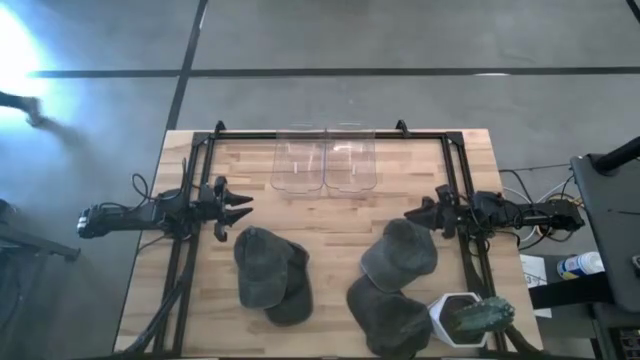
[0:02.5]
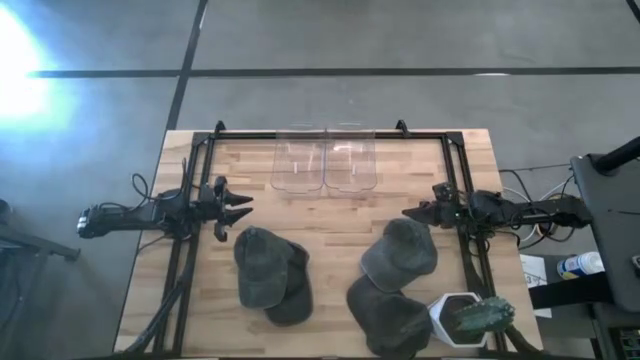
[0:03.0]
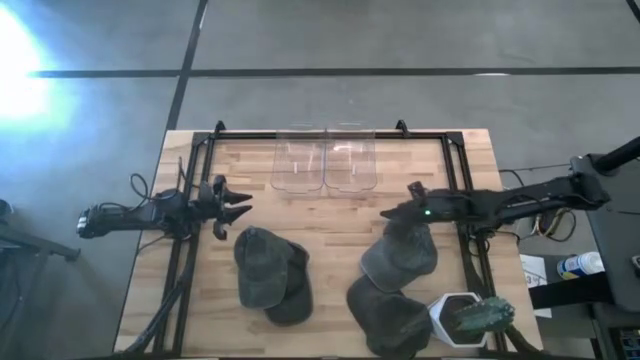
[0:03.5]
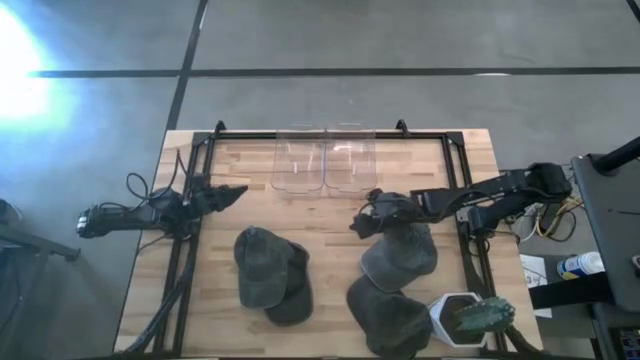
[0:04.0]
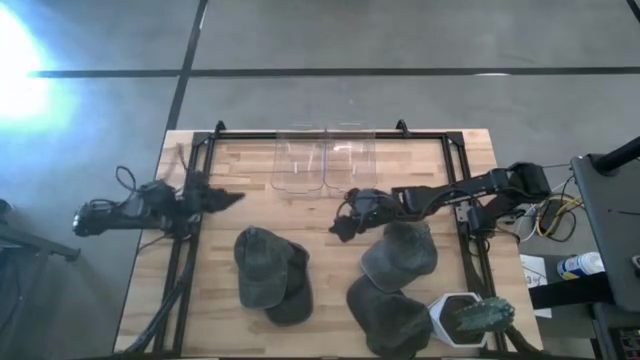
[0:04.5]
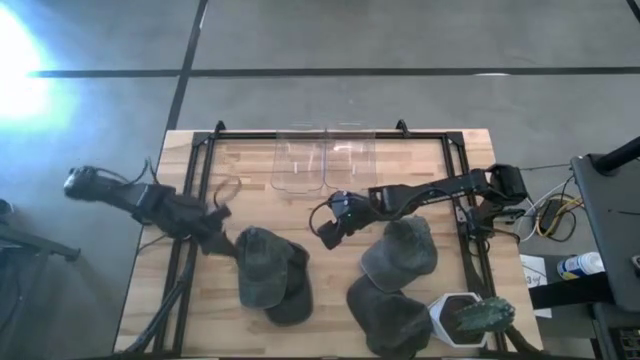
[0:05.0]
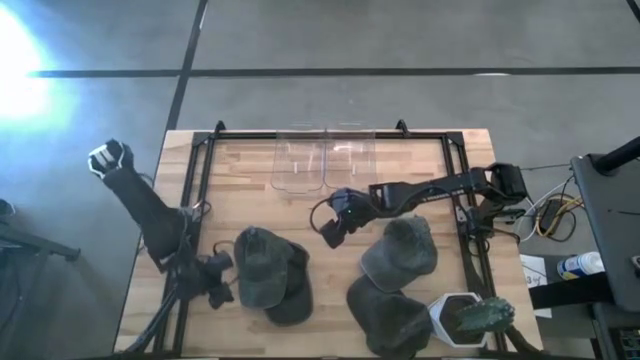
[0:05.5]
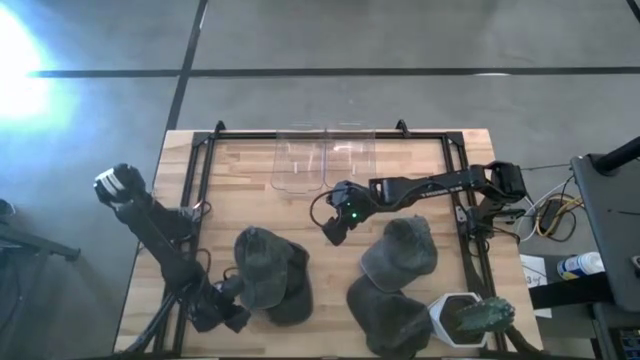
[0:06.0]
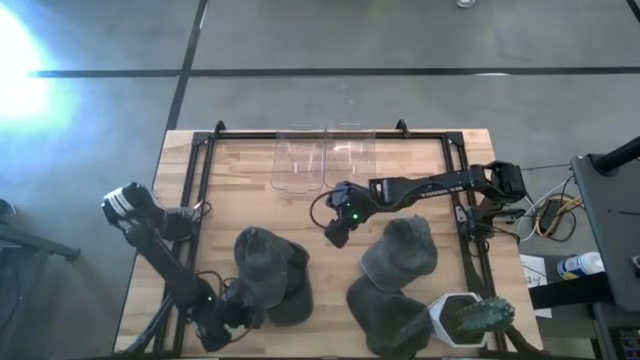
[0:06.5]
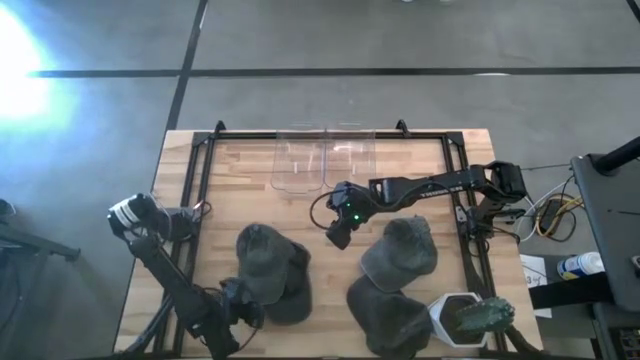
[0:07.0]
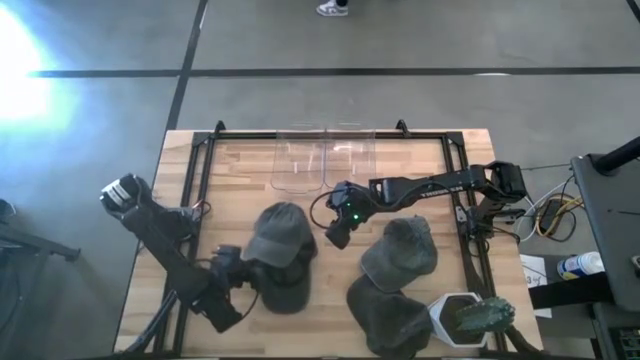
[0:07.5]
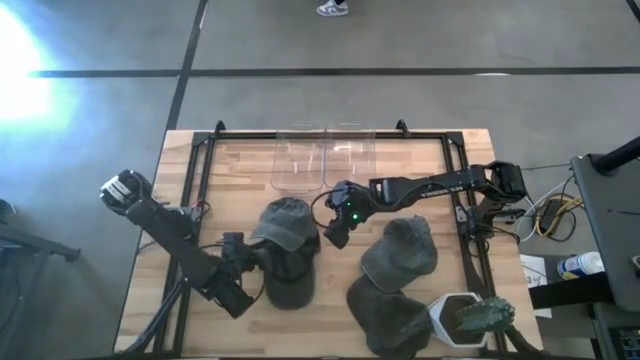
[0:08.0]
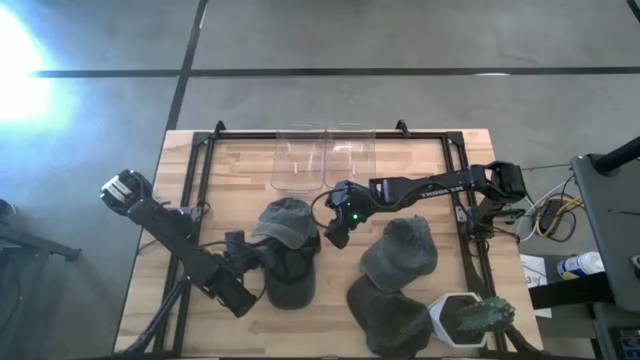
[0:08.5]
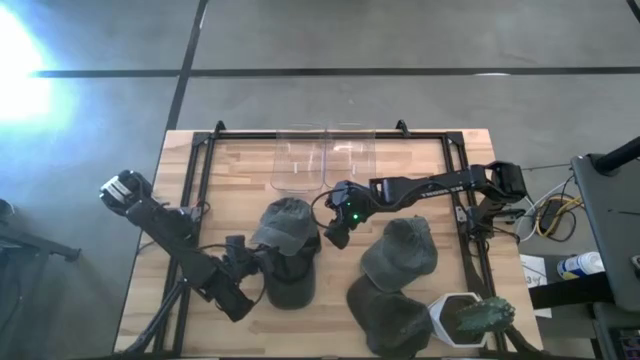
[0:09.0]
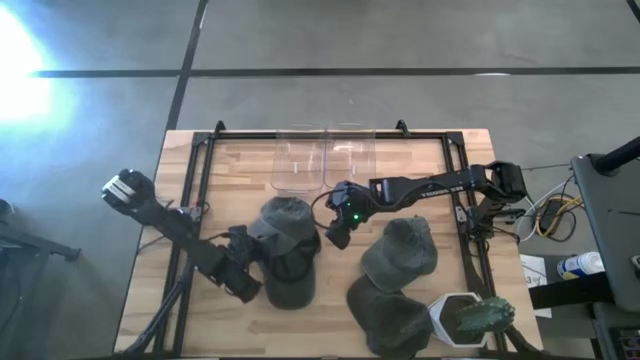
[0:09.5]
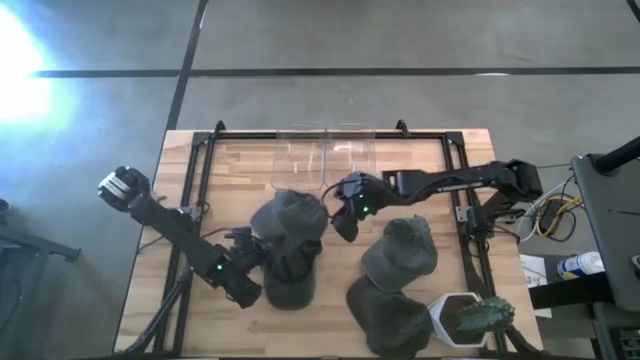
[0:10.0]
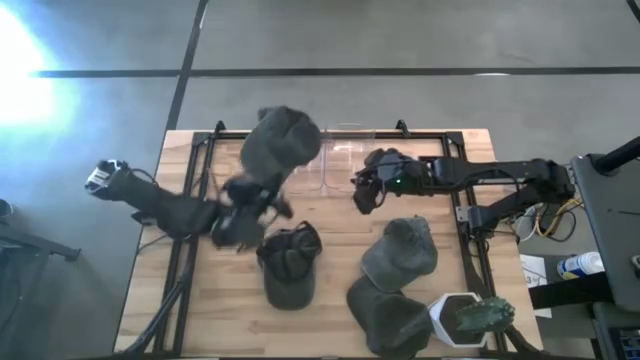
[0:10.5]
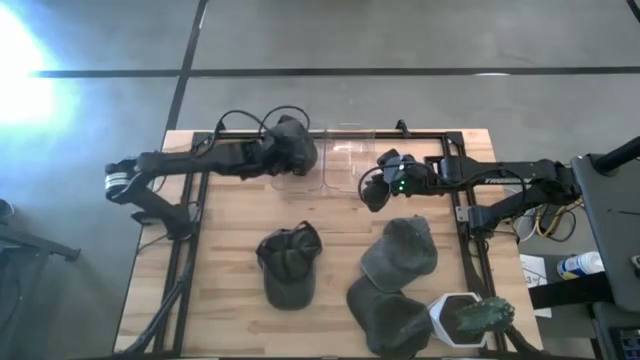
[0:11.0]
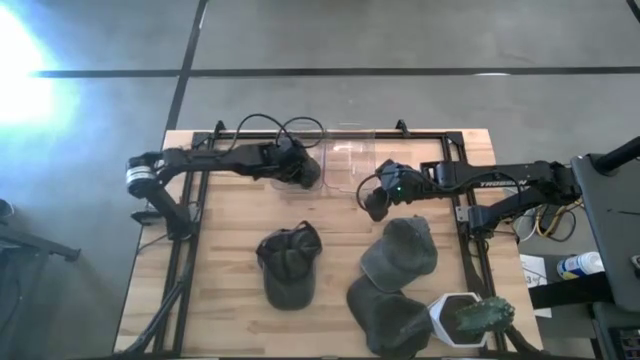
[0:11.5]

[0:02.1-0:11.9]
Task: Pick & Place hat
Put the left gray cap into the left transparent bin

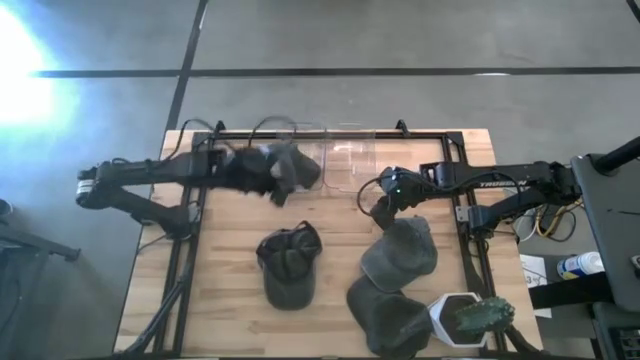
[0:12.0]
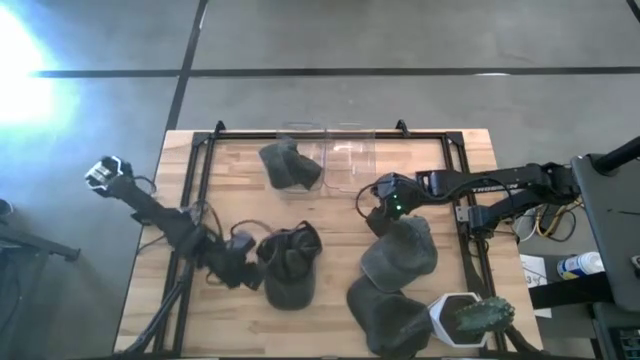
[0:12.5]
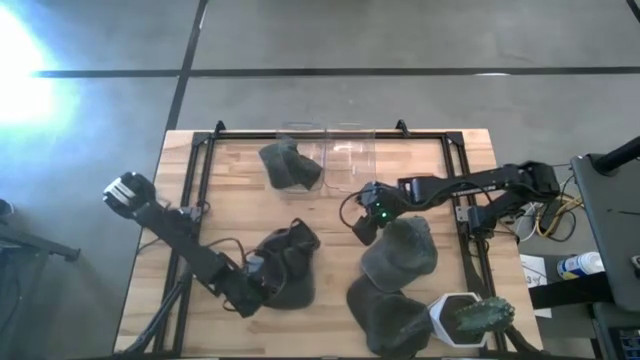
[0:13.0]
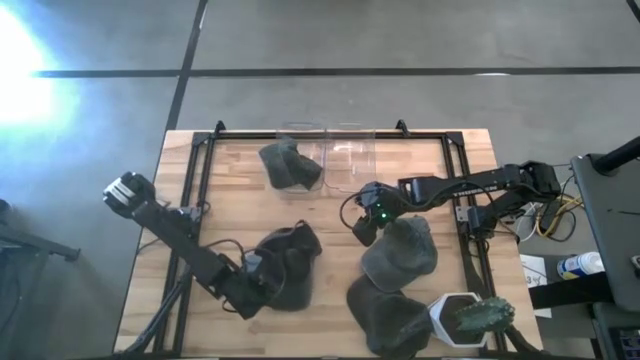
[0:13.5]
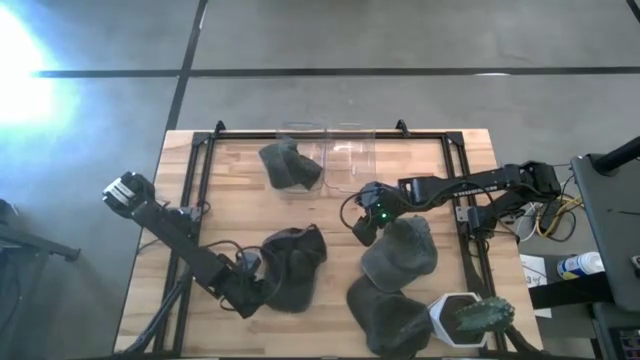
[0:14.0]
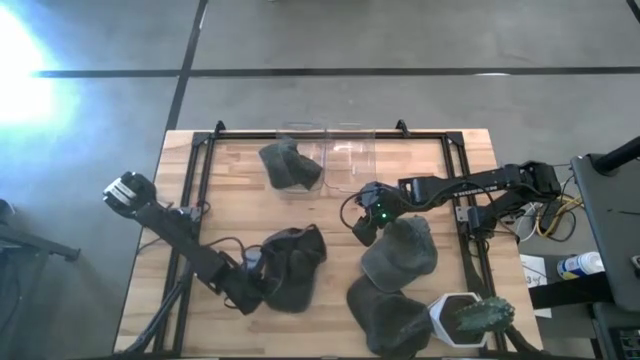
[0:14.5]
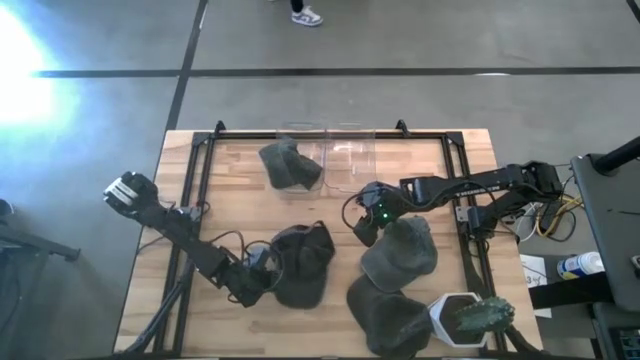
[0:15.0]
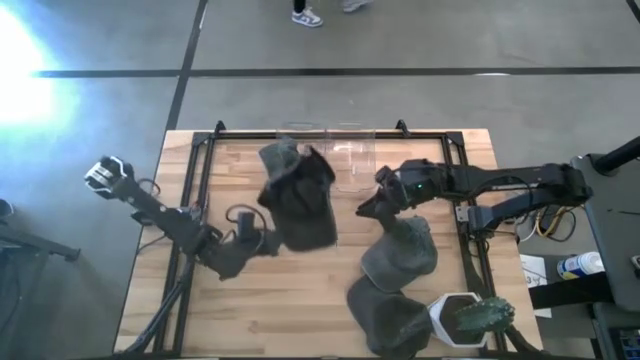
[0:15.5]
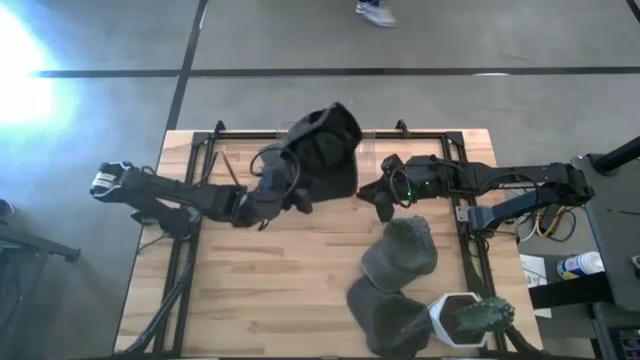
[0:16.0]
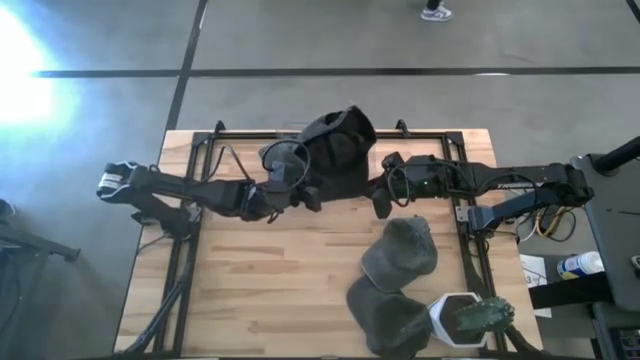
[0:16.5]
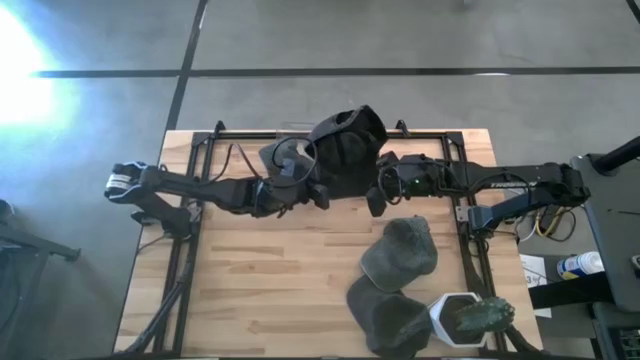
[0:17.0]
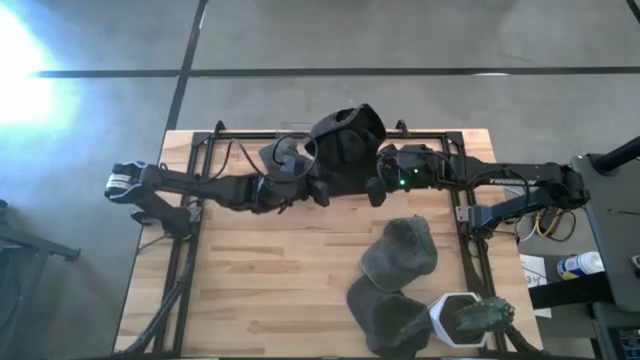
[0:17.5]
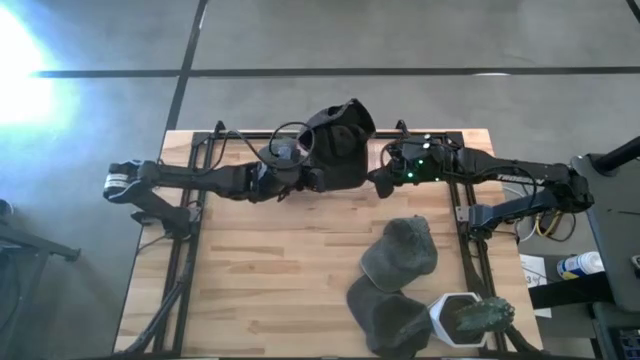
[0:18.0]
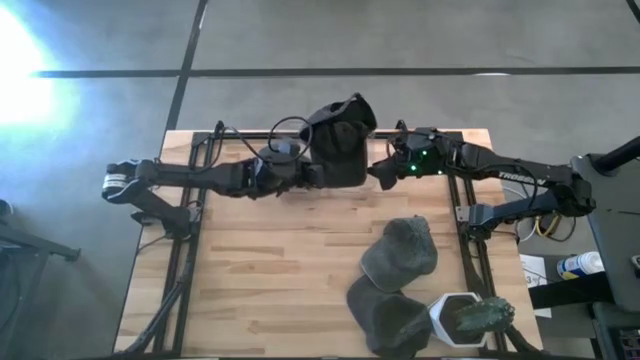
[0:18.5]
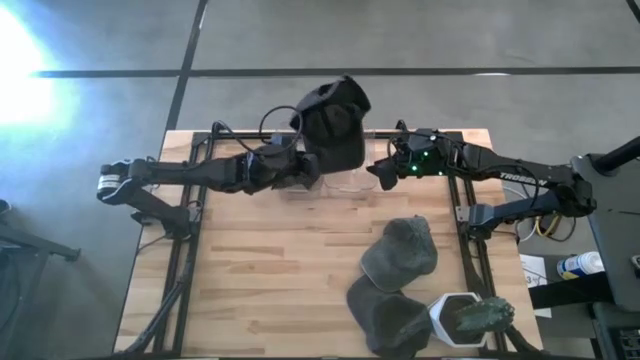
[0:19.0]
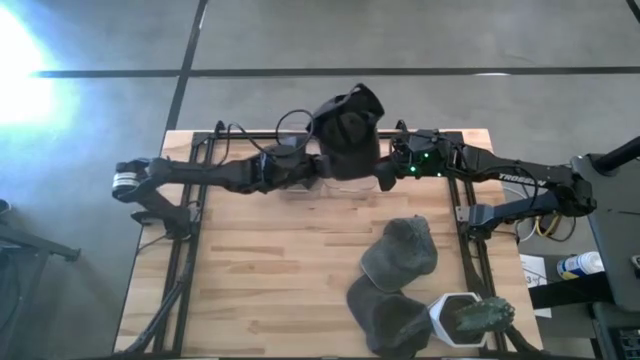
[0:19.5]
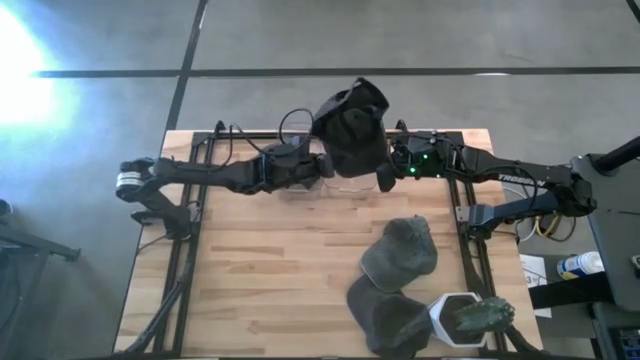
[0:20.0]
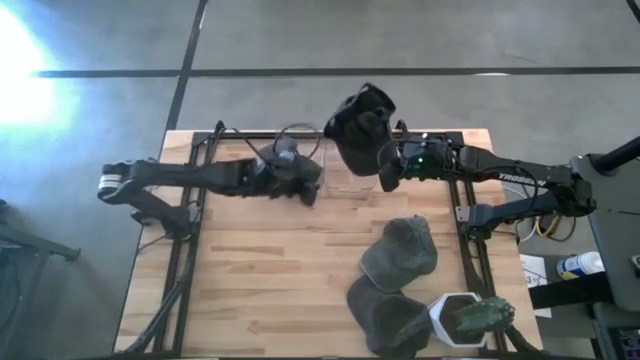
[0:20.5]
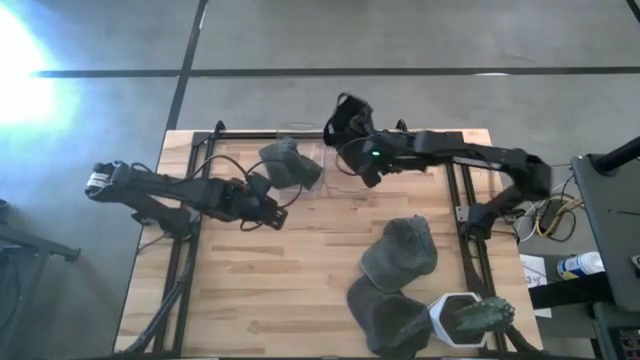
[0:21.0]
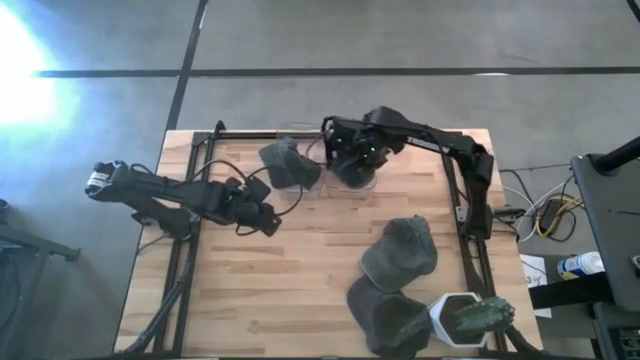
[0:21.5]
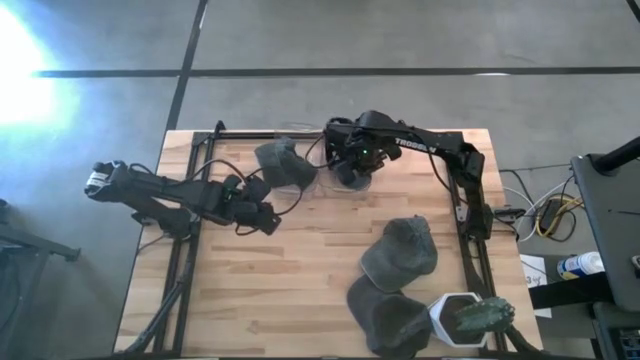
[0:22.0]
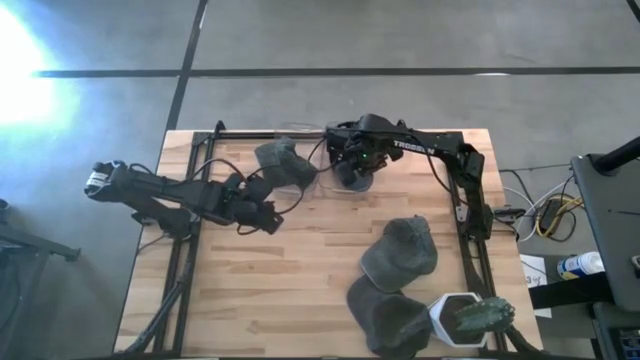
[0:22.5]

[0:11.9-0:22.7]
Put the top black cap into the right transparent bin

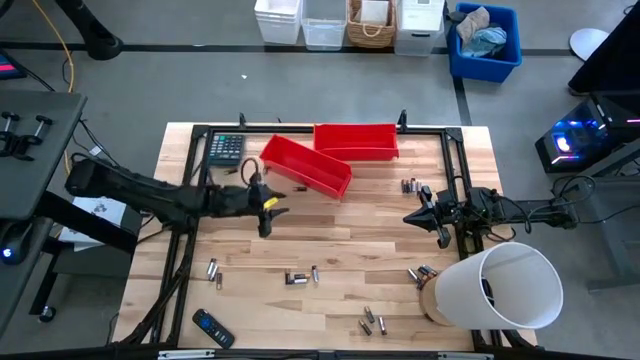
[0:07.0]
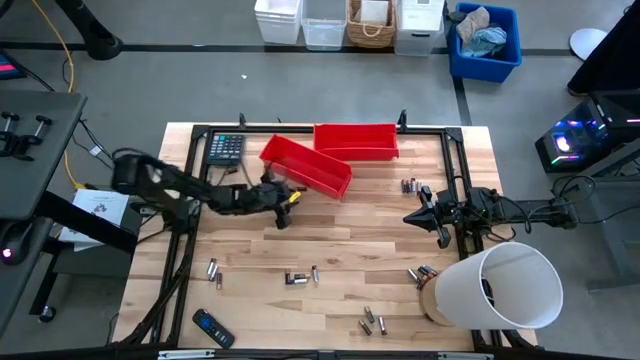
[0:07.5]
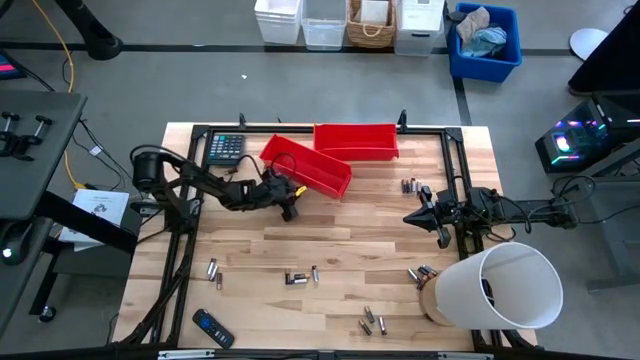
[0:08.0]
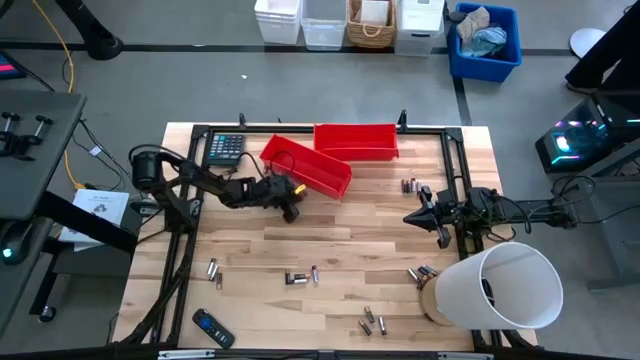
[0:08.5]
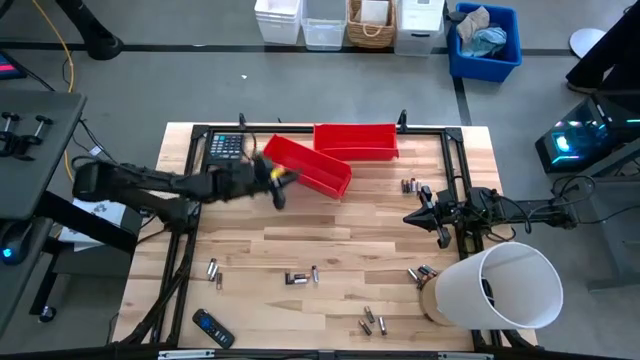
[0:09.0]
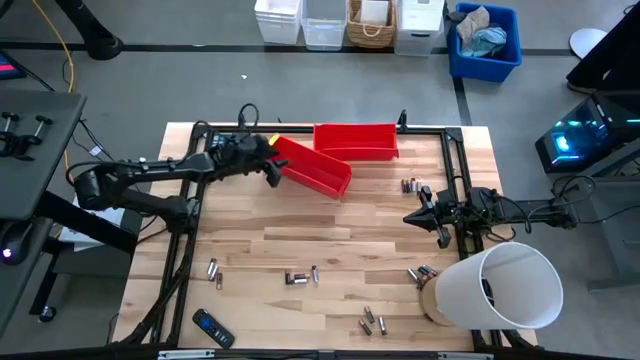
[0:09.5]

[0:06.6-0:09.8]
Task: Sort batteries
Put the black battery into the bottom red bin
